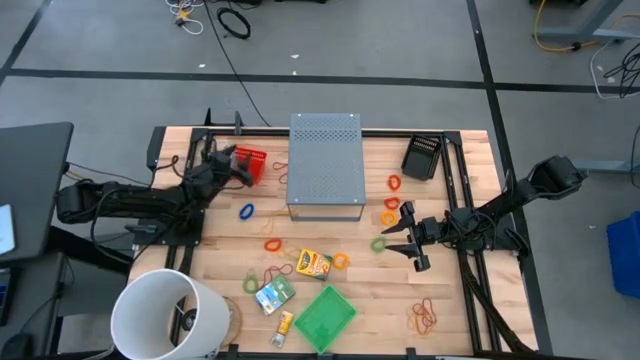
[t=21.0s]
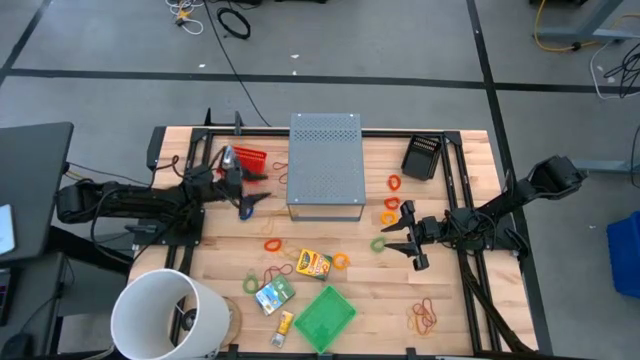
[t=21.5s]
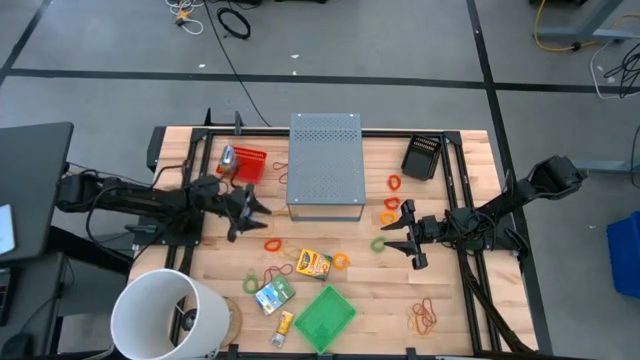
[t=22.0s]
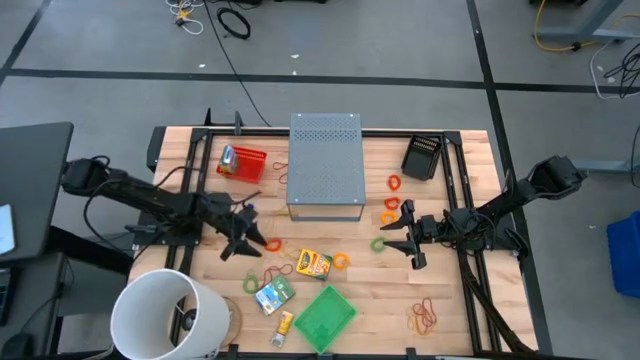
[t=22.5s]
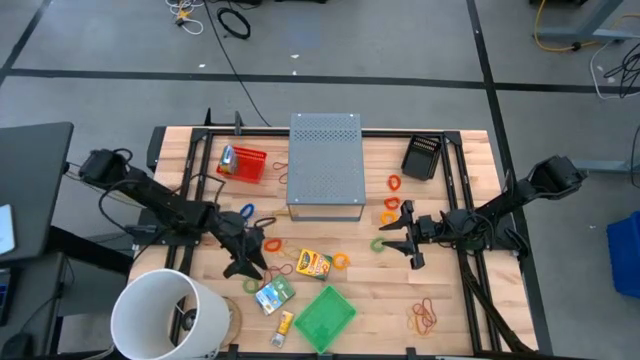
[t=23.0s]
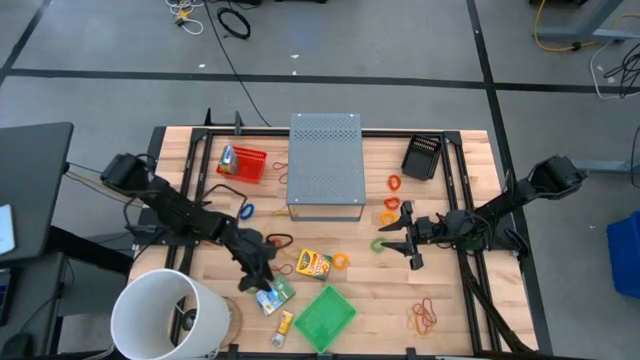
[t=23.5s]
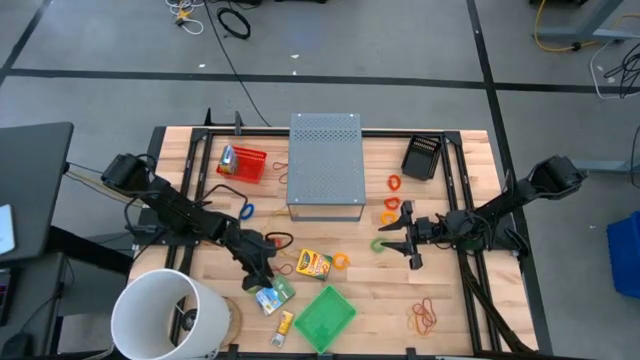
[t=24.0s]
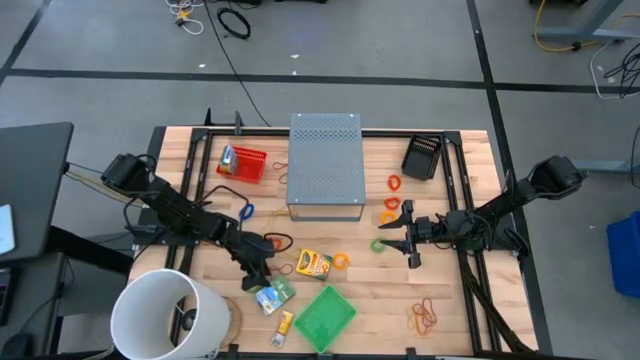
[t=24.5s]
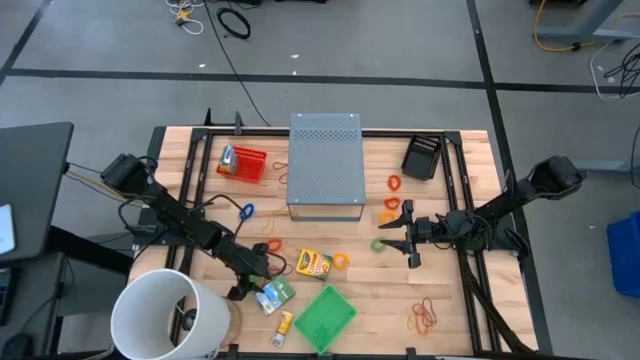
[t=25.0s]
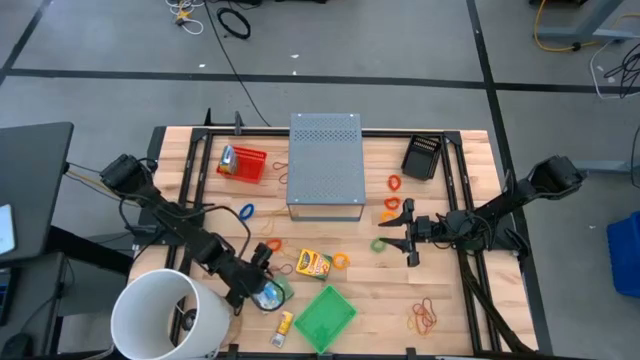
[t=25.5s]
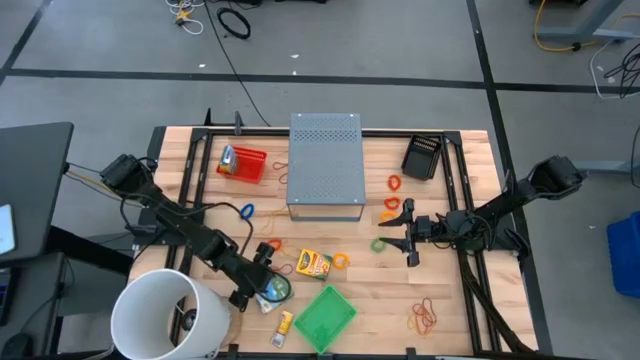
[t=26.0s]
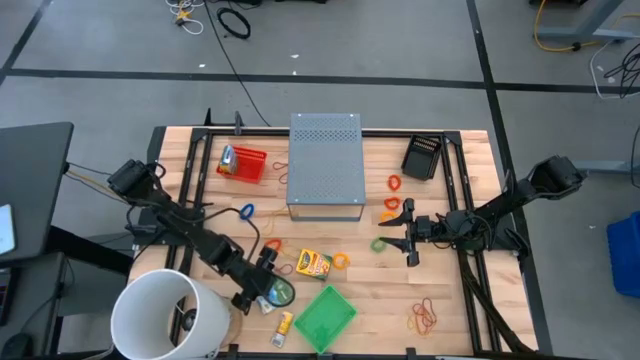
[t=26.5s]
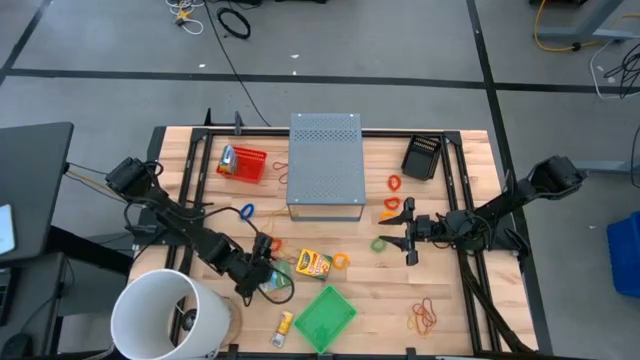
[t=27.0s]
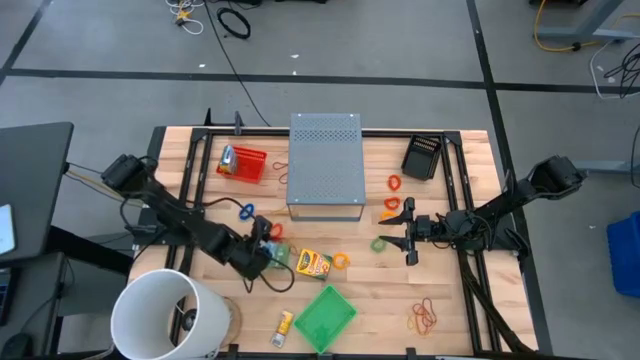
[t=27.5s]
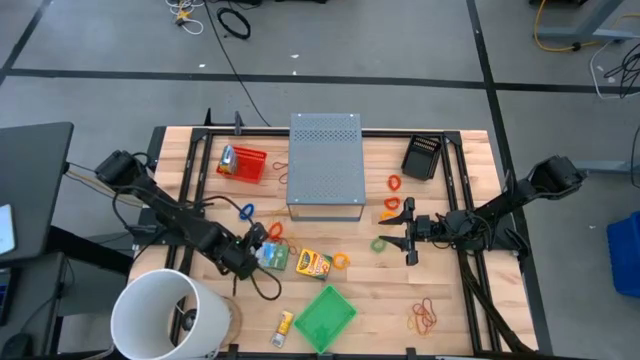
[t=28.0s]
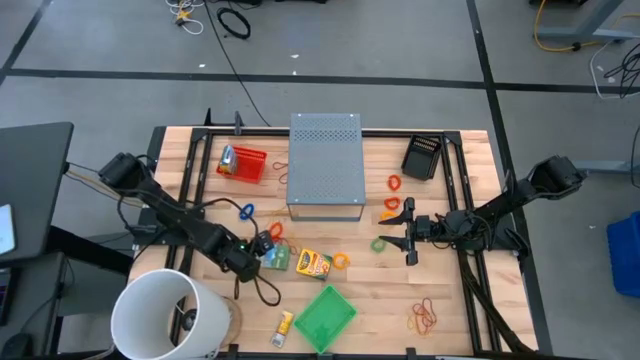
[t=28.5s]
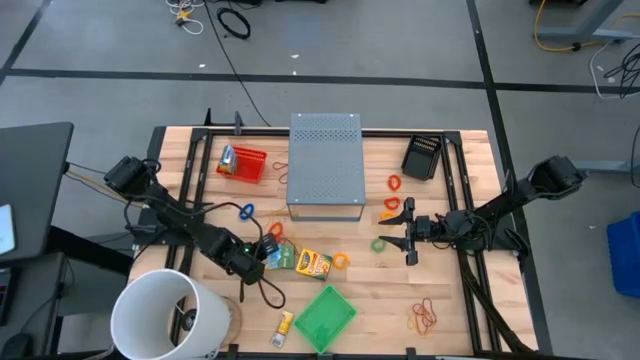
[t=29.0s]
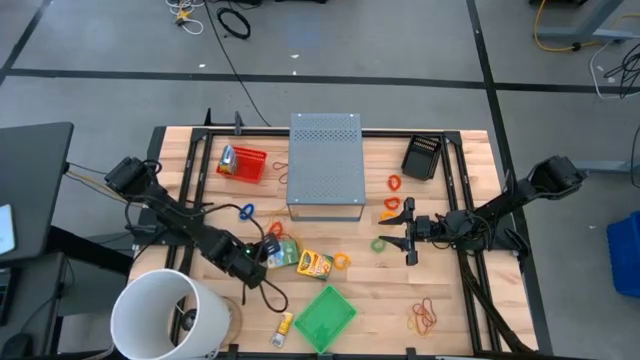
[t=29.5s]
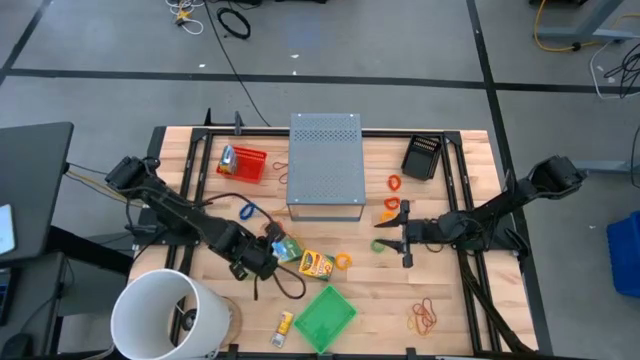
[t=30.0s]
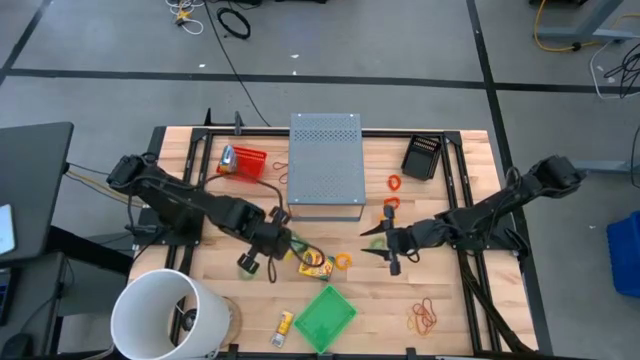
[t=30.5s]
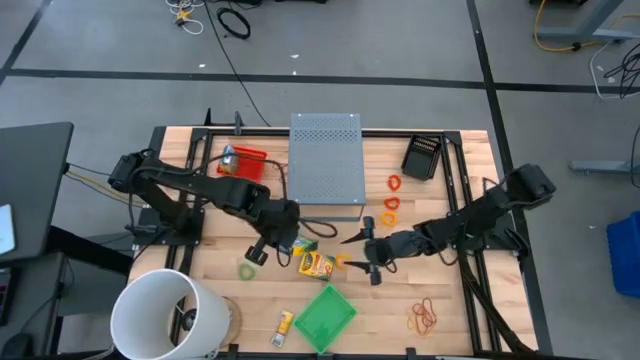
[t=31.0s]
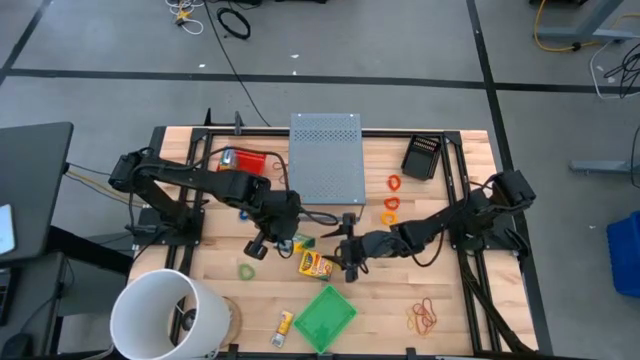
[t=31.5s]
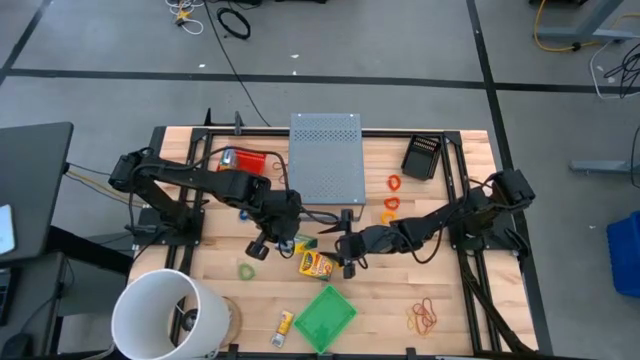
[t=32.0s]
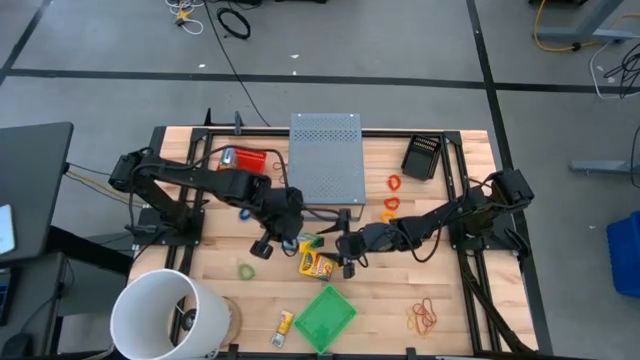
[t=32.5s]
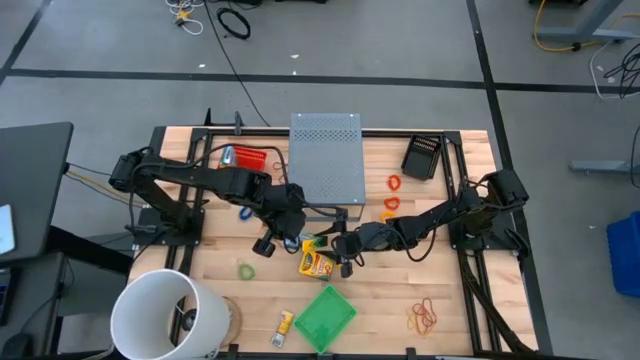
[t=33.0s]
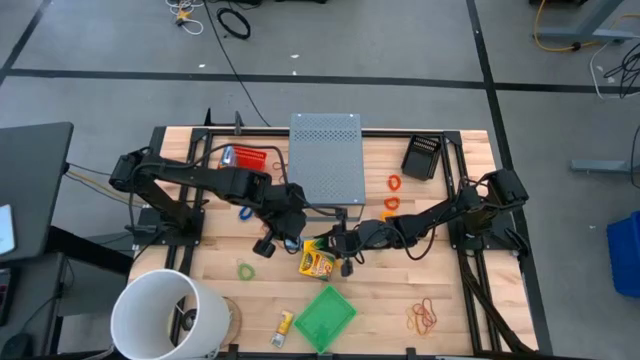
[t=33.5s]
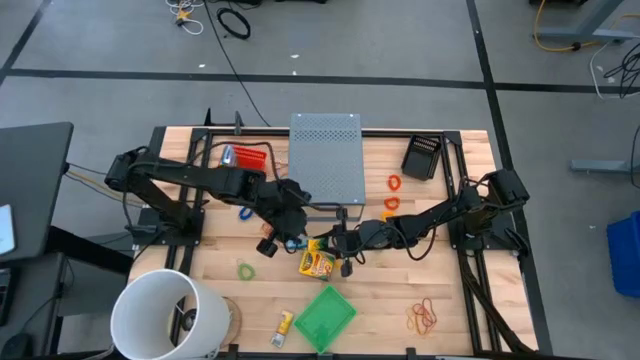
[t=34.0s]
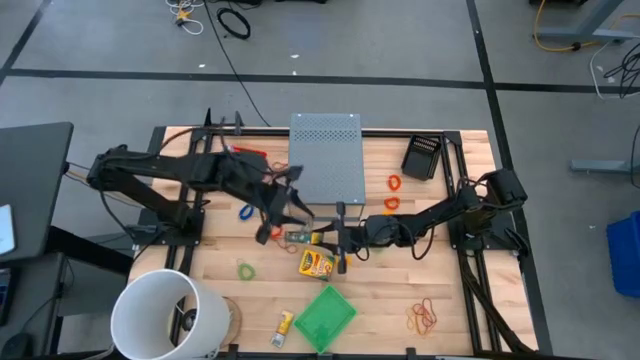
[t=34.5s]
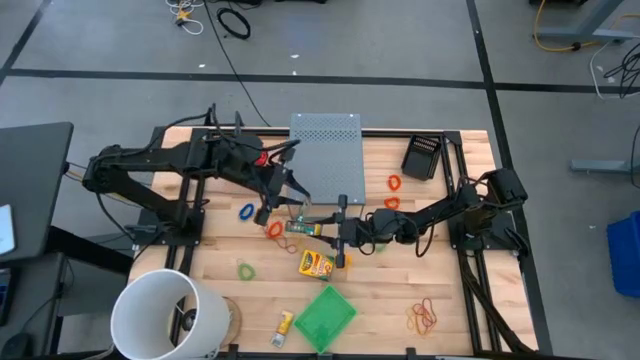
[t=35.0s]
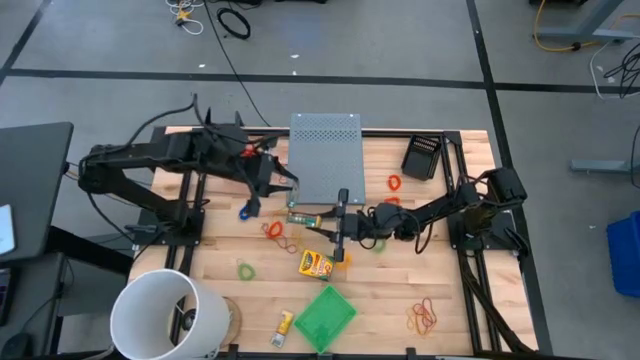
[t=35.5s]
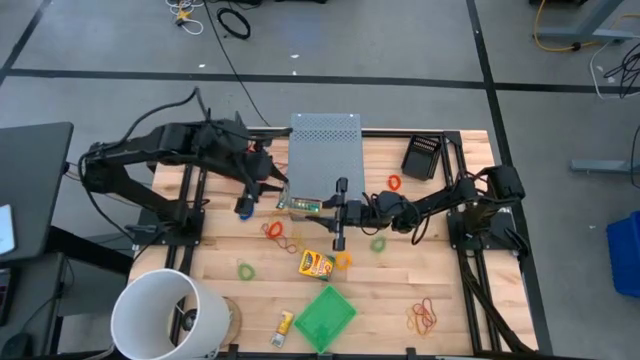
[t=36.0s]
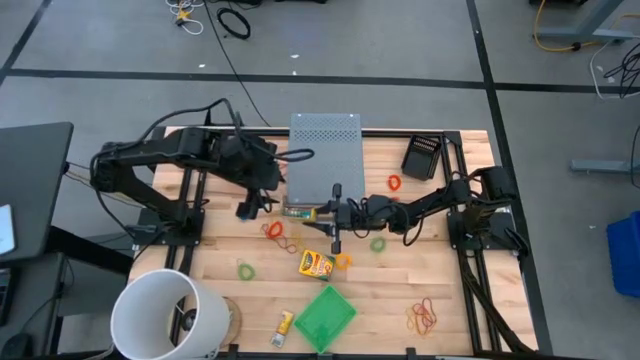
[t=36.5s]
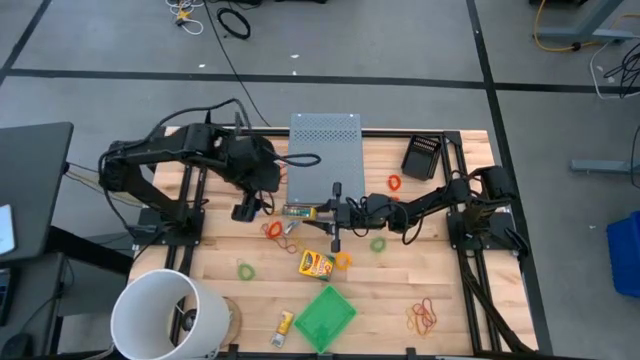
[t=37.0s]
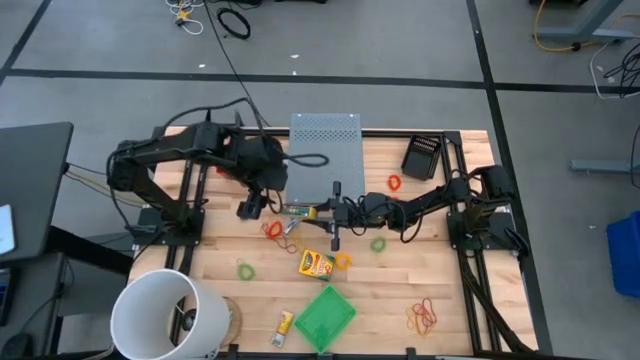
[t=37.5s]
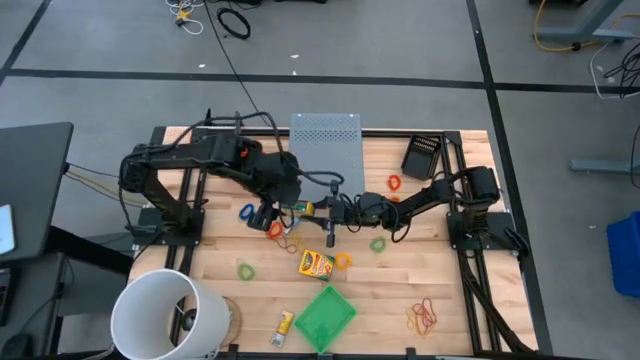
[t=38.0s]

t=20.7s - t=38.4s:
Task: Pick & Place Office Desk Supplies
Put the yellow crayon box into the red basket

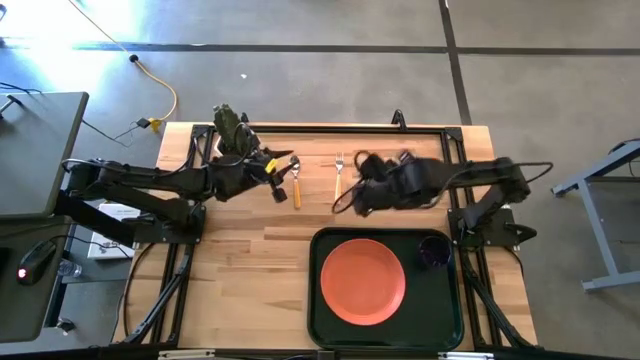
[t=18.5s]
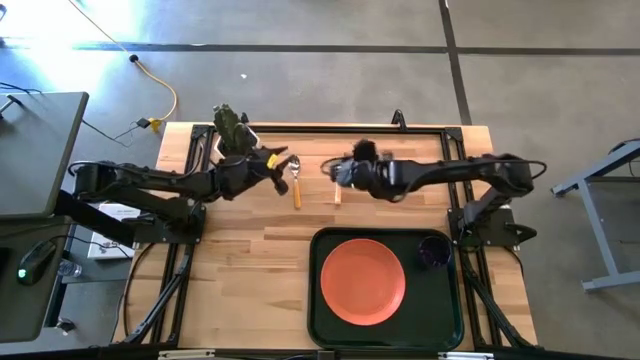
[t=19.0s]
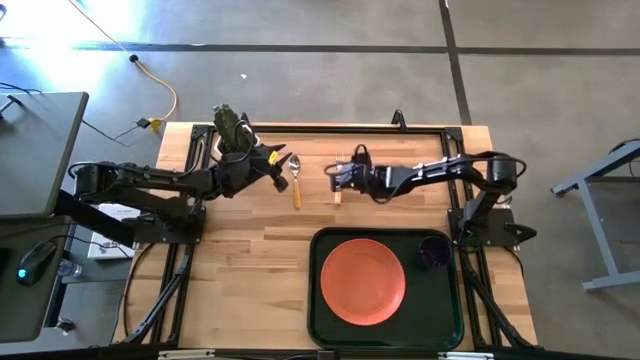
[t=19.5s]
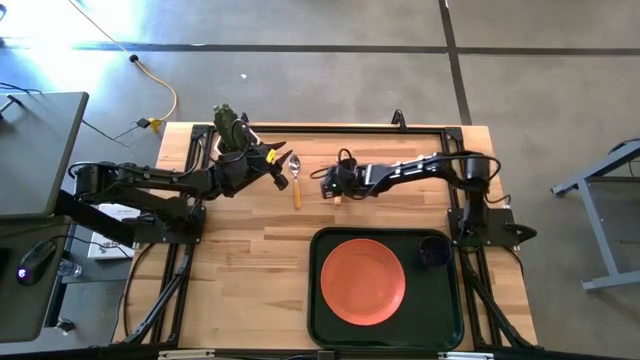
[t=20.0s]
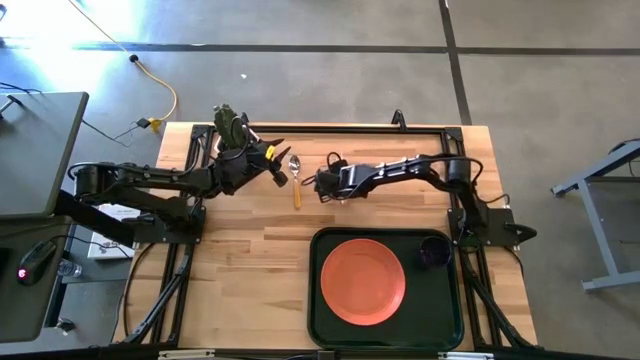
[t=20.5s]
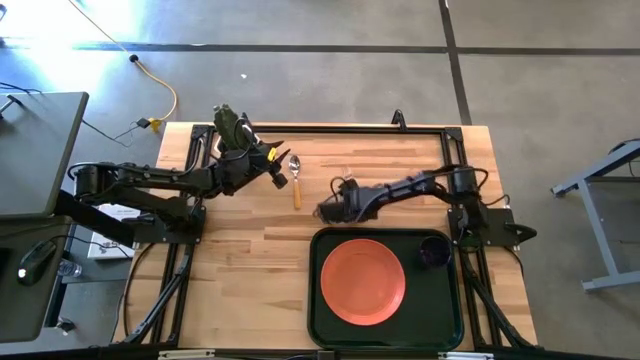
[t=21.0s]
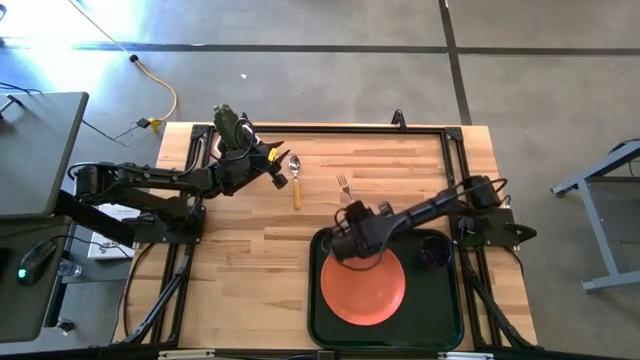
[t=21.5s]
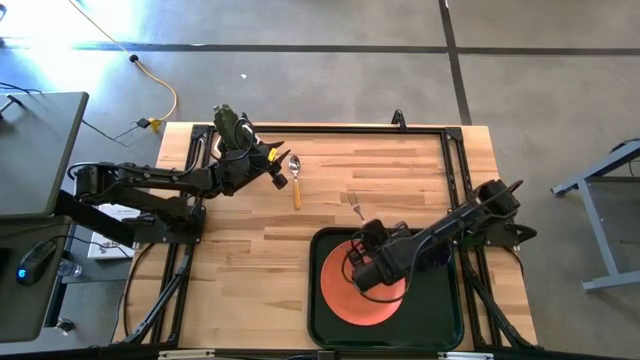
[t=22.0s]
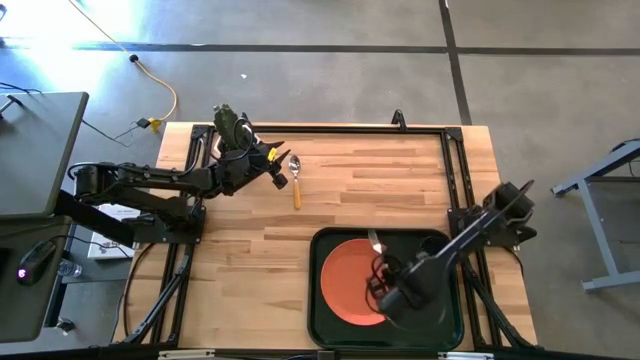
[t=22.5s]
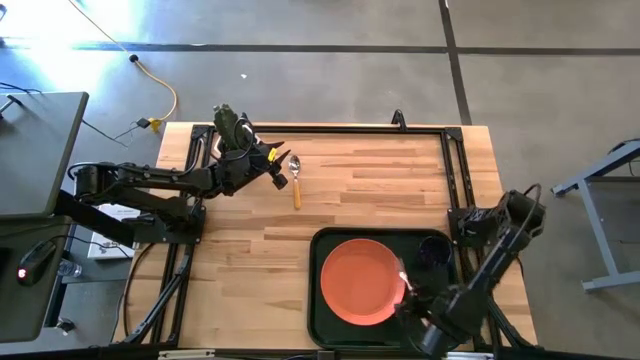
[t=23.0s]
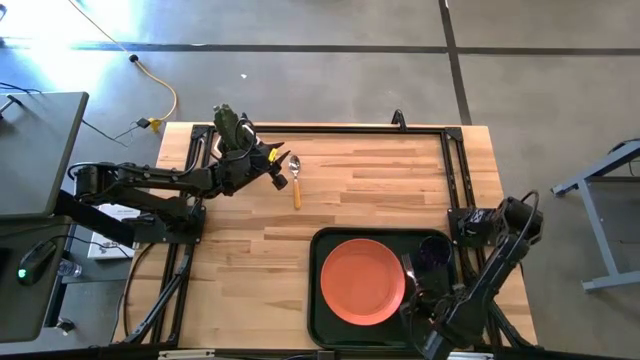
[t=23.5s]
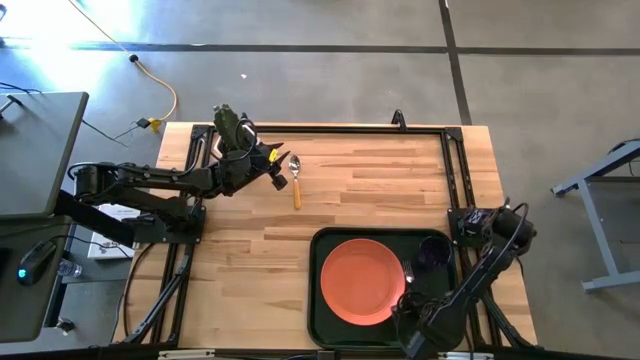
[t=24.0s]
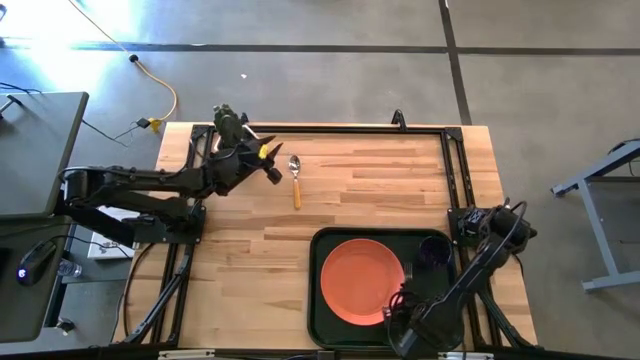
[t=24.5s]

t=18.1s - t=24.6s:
Task: Pick and place plate/cup/fork/spoon on tray
Put the light yellow fork on the black serving tray to the right of the orange plate
